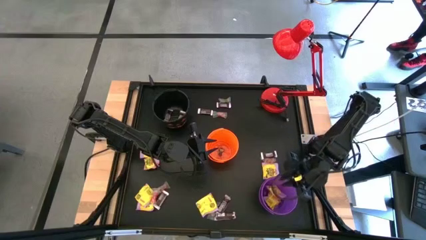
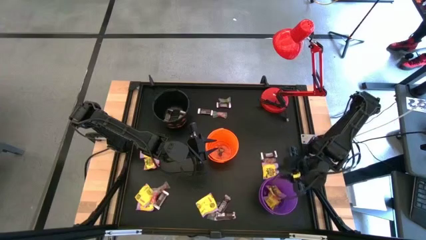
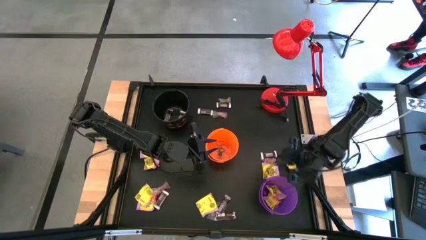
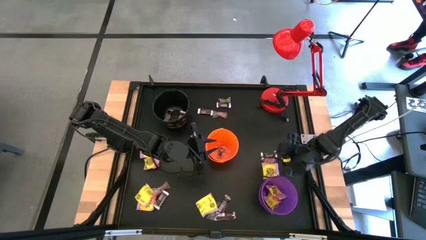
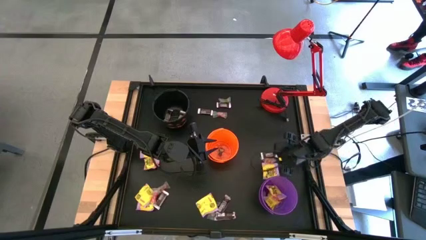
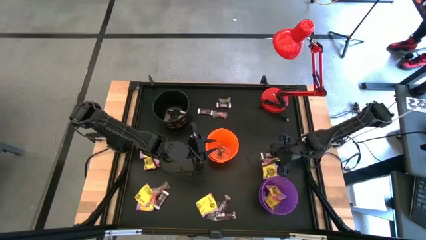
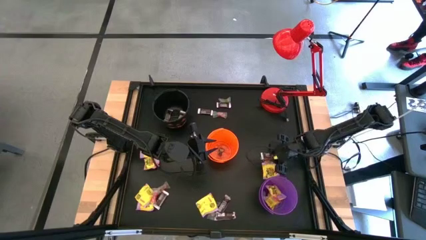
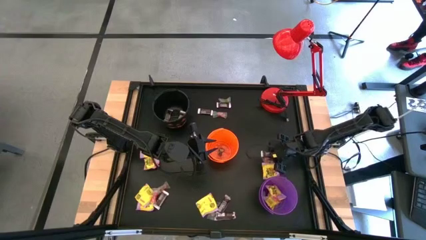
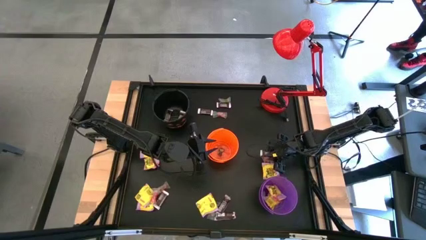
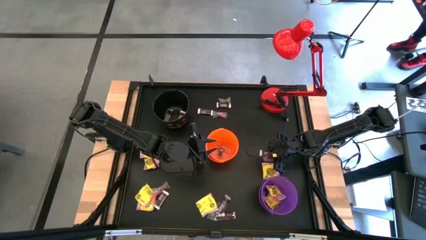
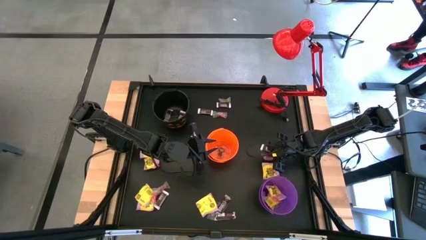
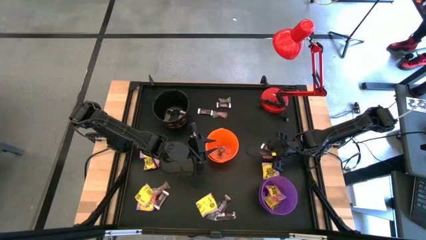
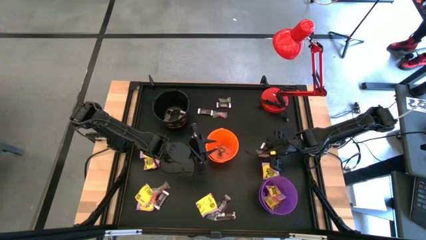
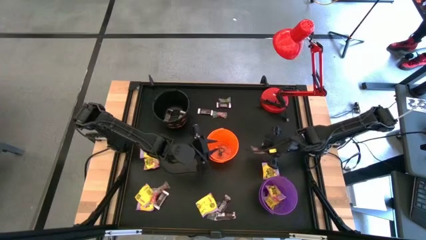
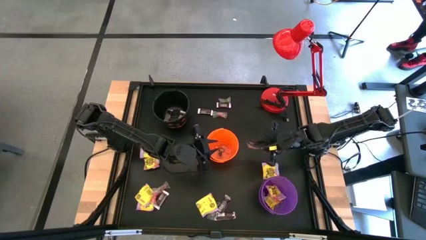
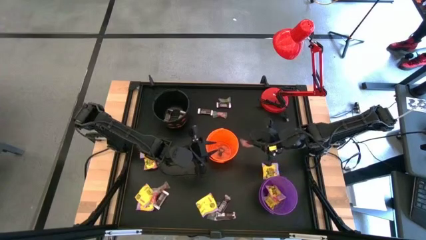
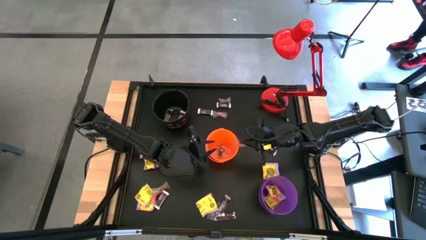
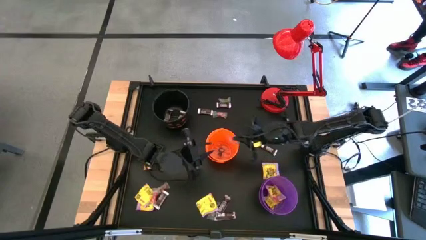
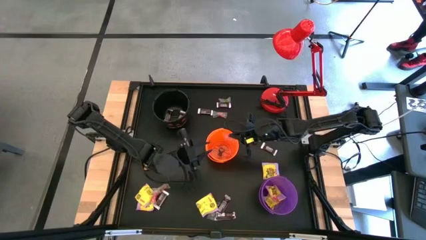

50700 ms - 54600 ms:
Task: Sort candy
Put the orange gummy into the orange bucket

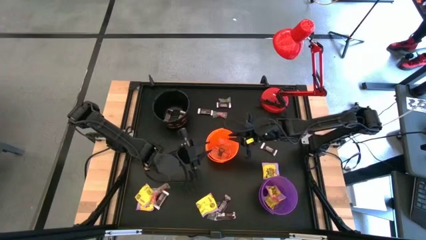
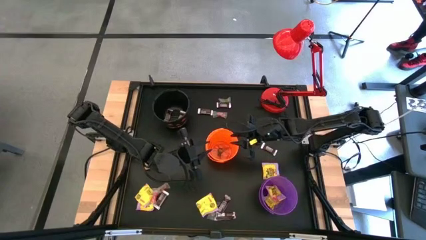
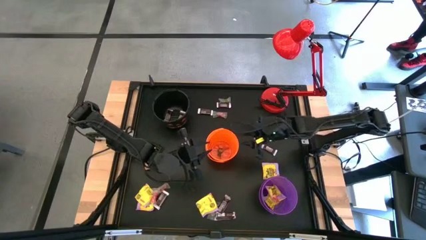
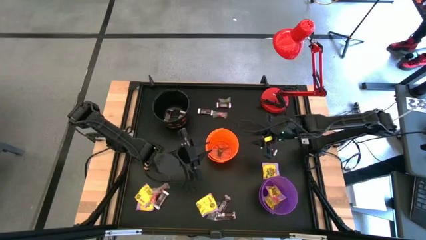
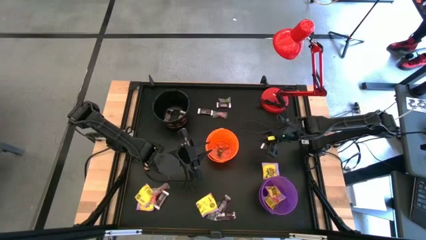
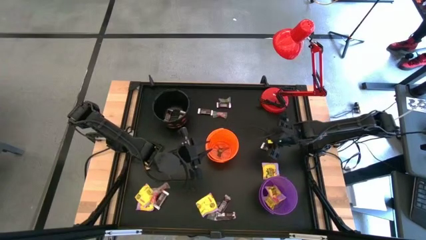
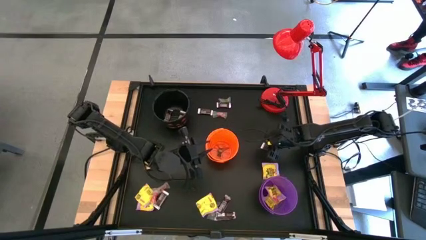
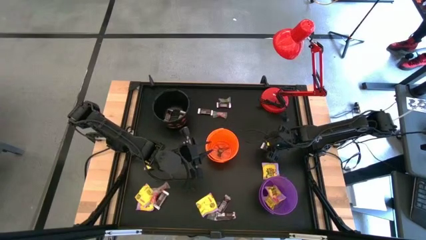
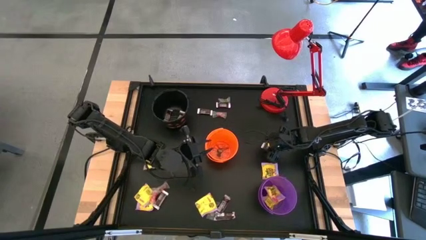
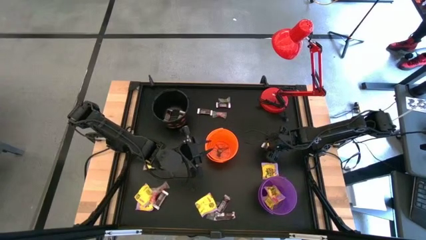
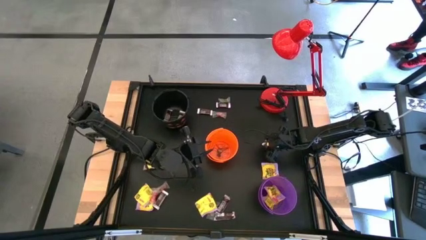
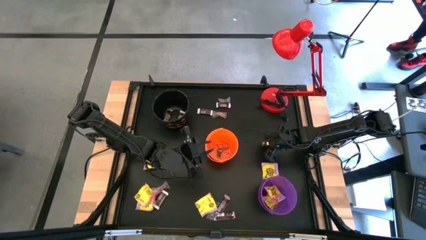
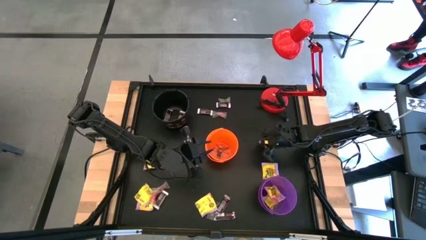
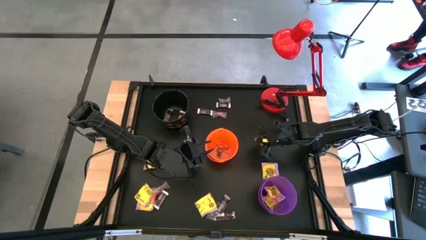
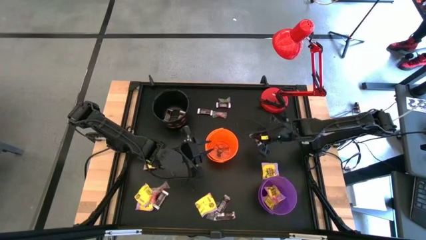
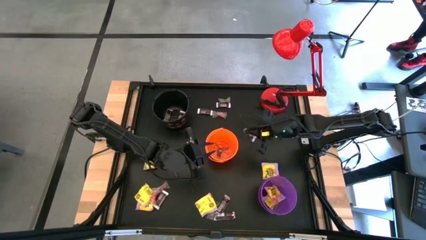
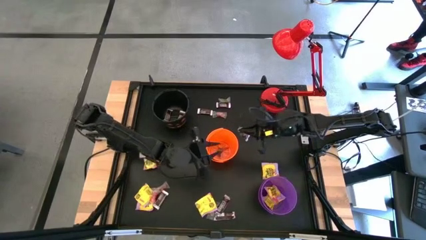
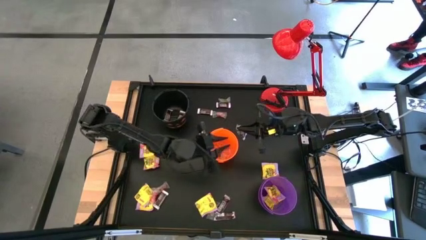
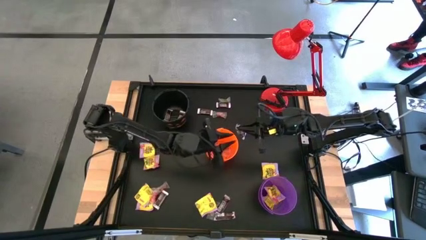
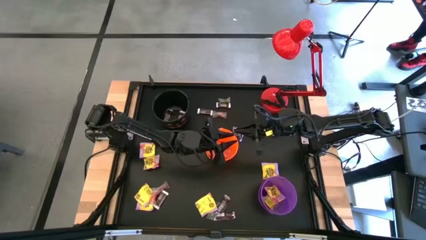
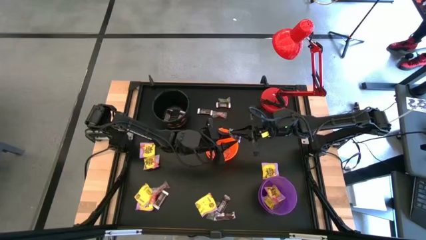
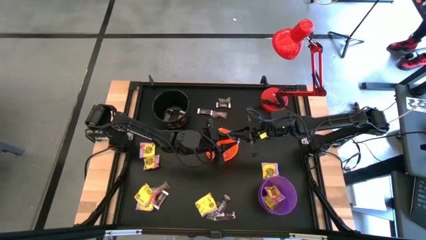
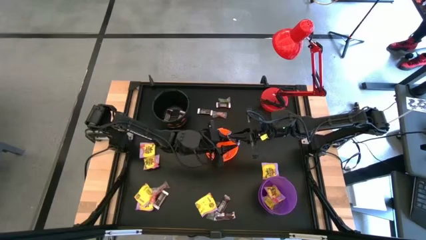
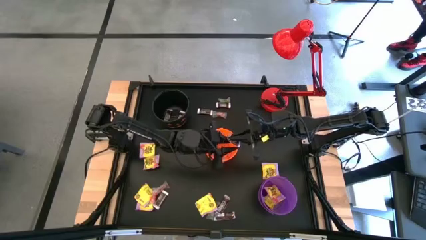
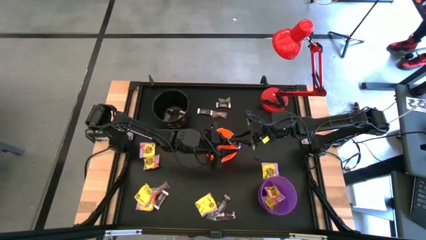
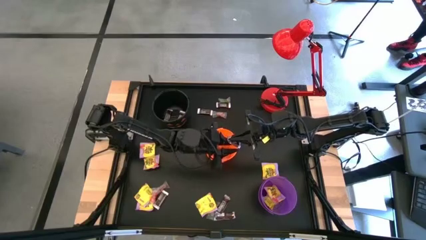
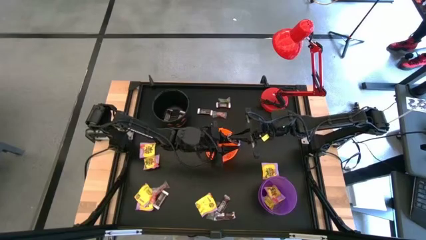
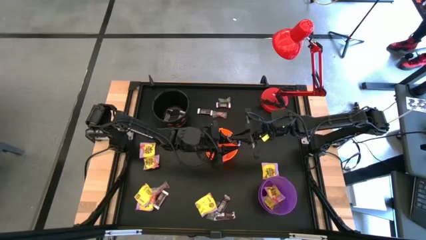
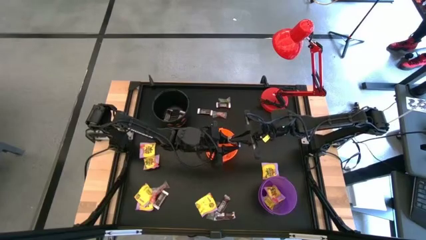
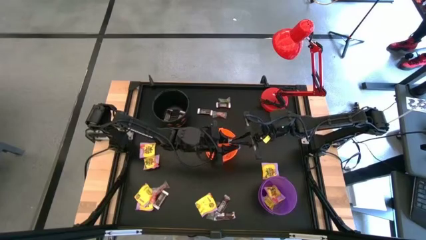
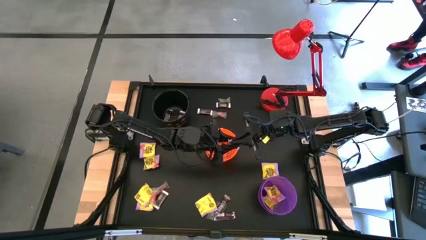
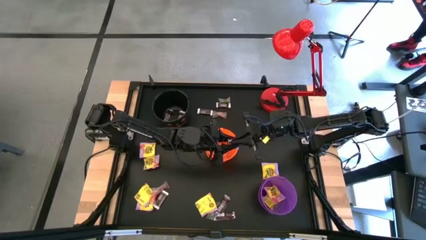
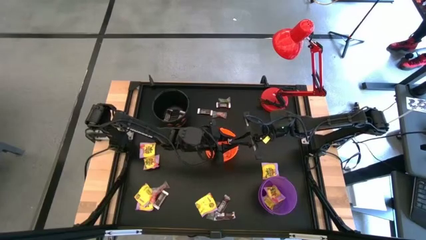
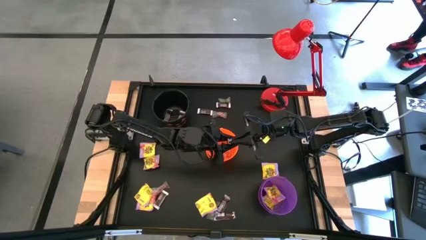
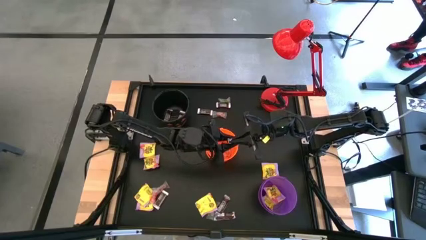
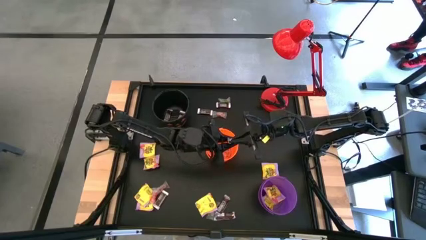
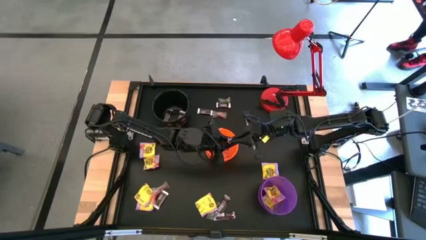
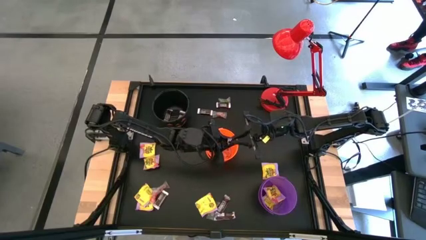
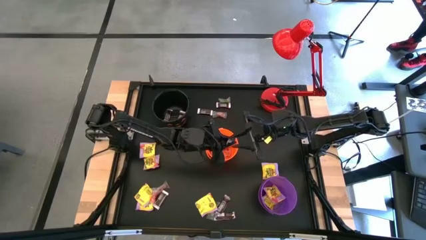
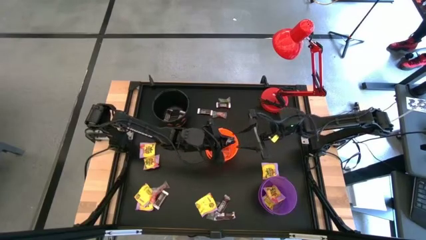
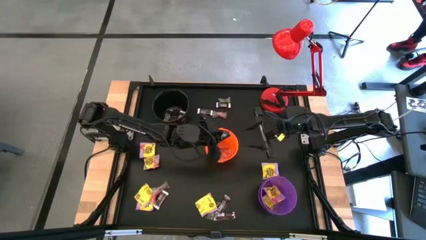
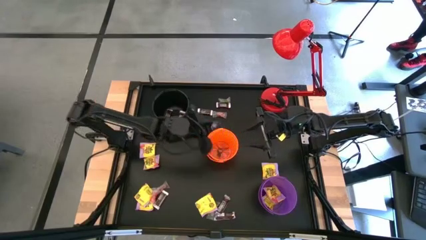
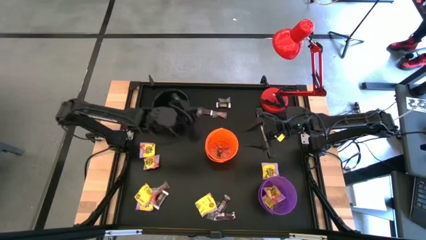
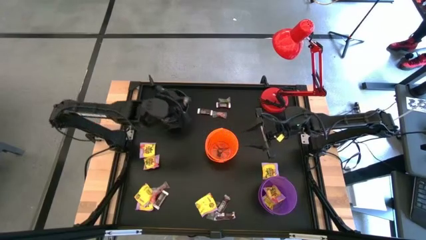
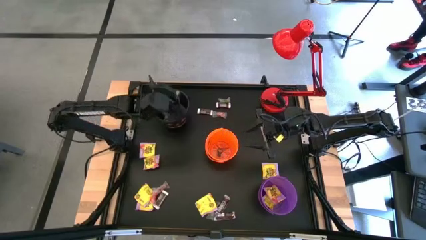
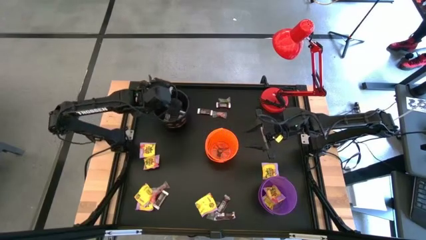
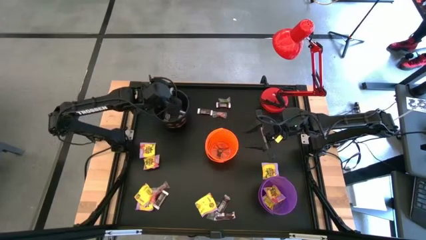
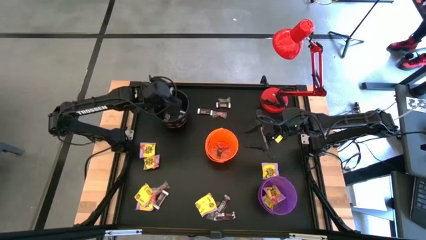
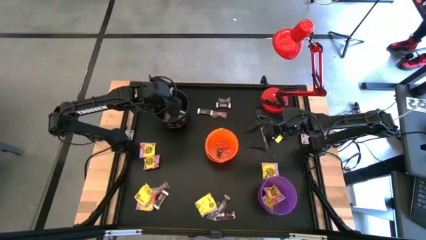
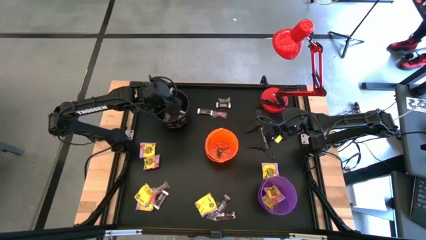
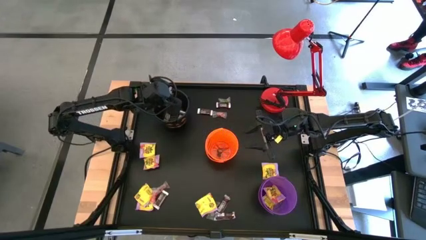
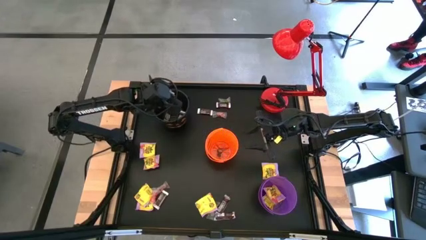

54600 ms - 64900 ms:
Put the brown chocolate bar into the black bucket

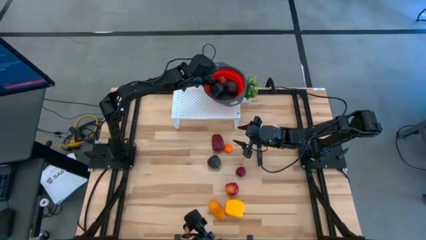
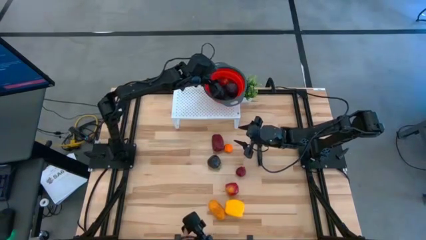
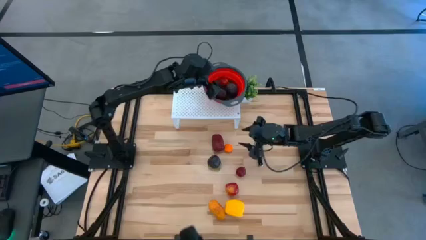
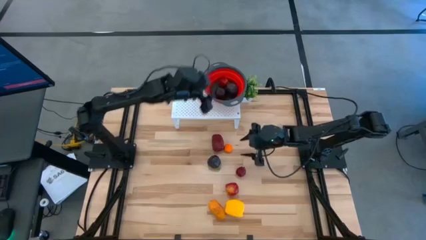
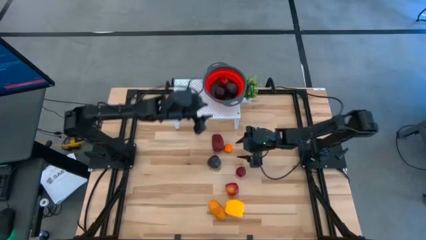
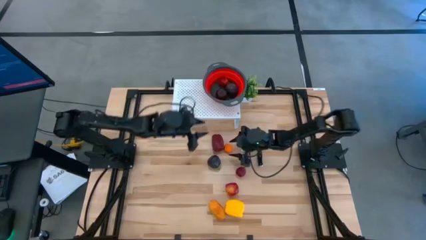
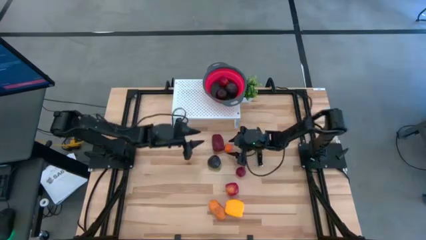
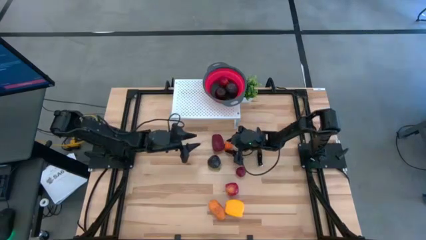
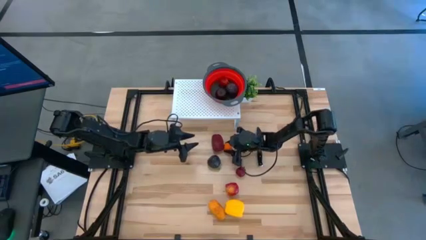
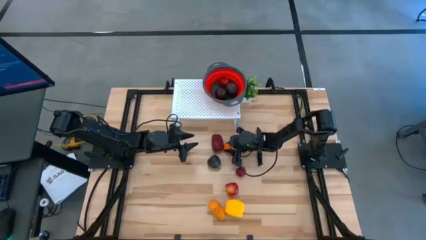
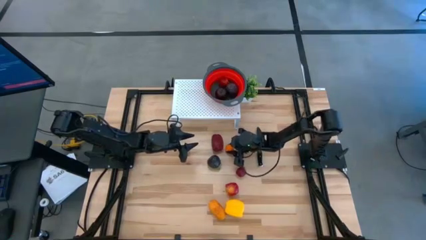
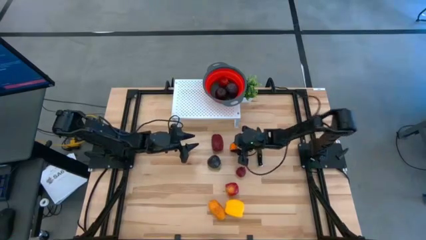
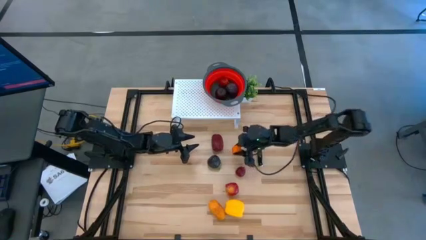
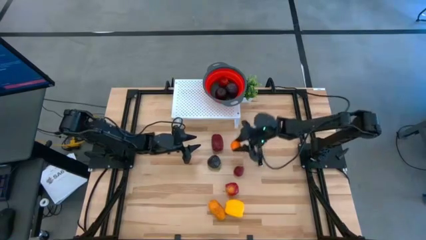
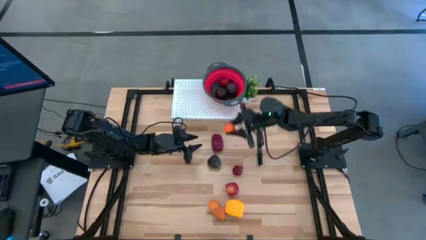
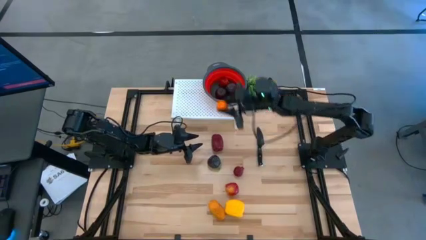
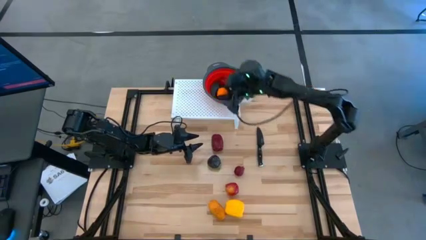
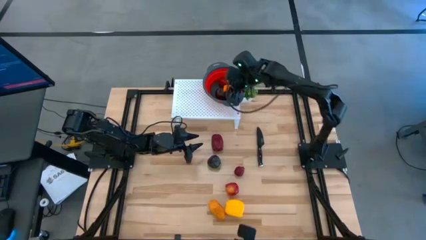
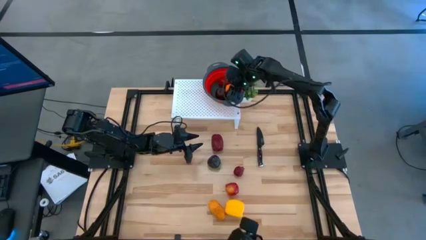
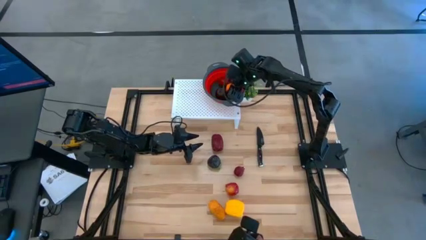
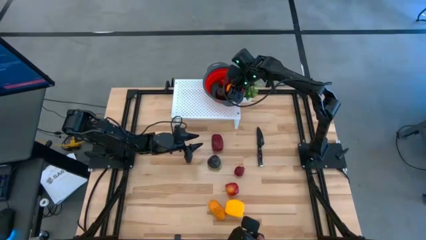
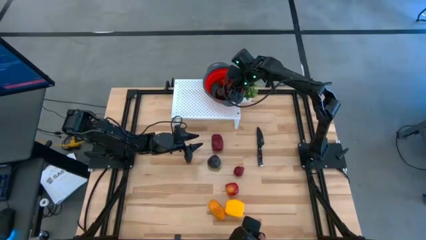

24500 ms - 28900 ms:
Task: Pick & Place Fruit
Put the orange into the red strainer bowl
